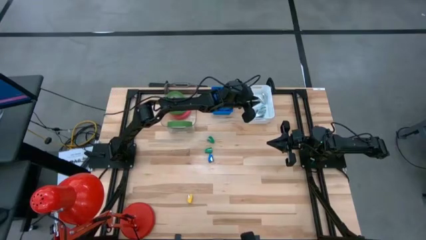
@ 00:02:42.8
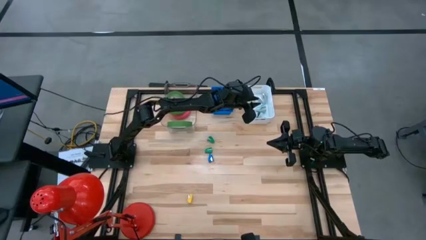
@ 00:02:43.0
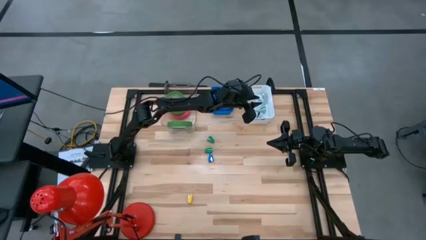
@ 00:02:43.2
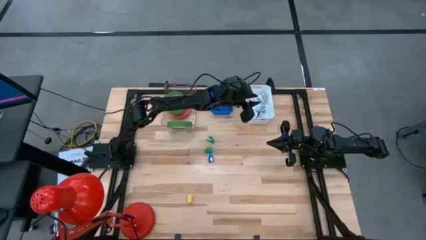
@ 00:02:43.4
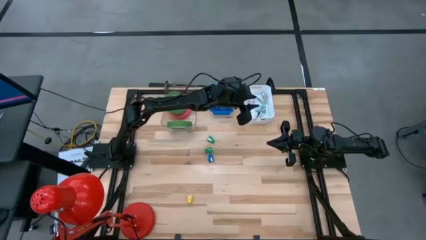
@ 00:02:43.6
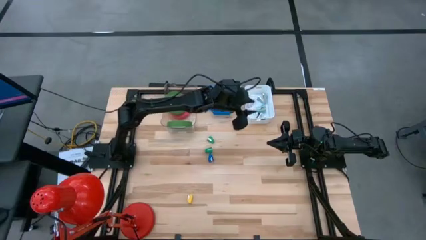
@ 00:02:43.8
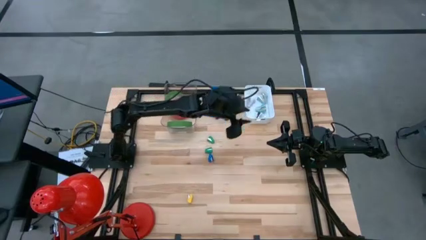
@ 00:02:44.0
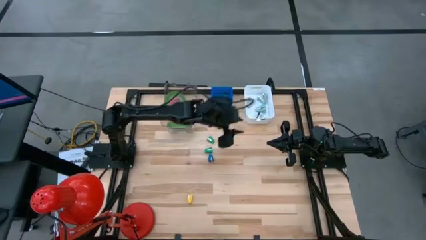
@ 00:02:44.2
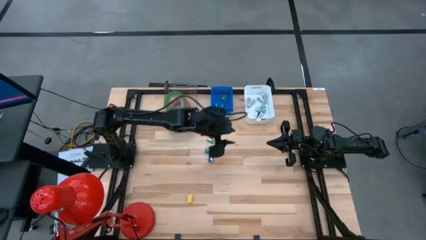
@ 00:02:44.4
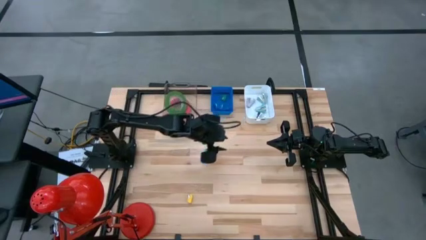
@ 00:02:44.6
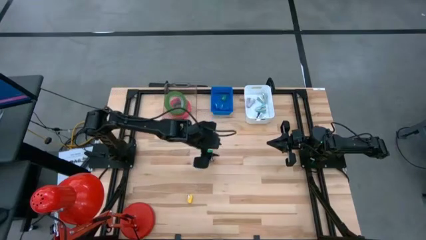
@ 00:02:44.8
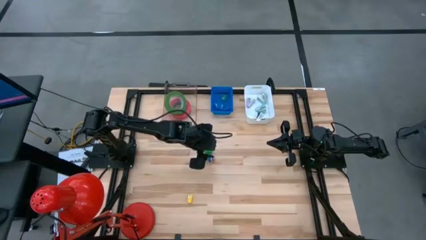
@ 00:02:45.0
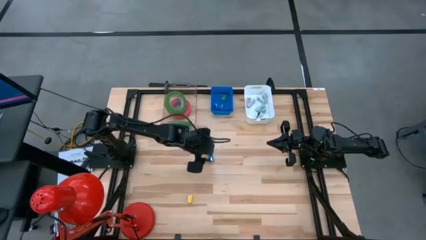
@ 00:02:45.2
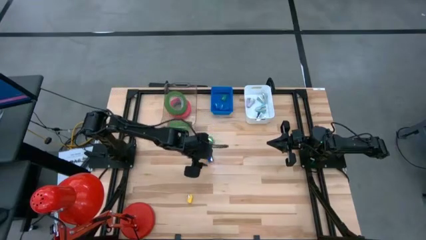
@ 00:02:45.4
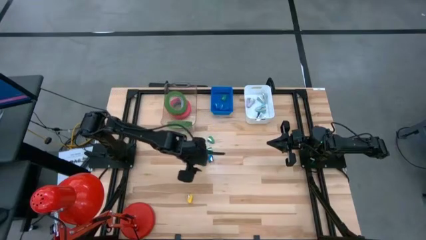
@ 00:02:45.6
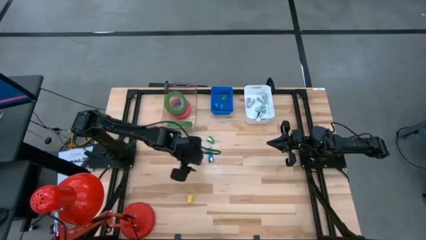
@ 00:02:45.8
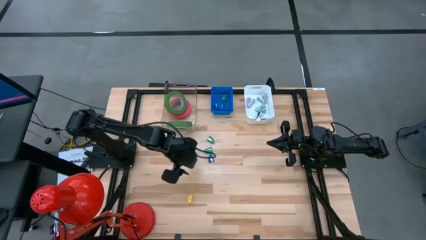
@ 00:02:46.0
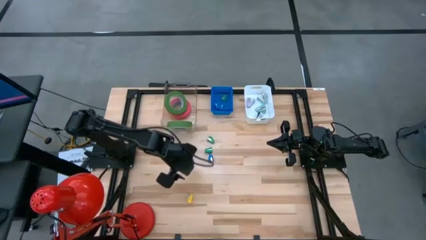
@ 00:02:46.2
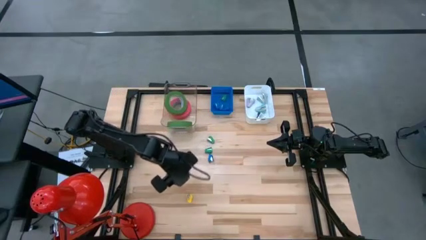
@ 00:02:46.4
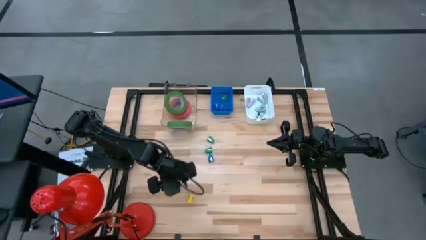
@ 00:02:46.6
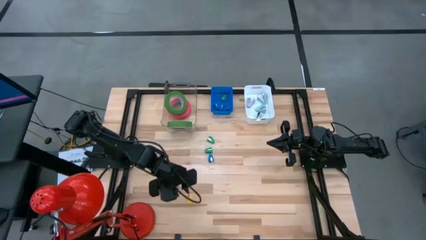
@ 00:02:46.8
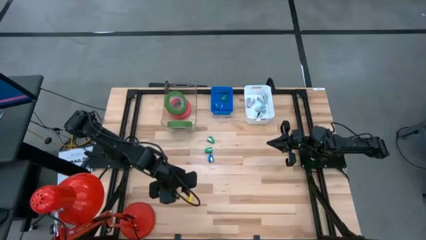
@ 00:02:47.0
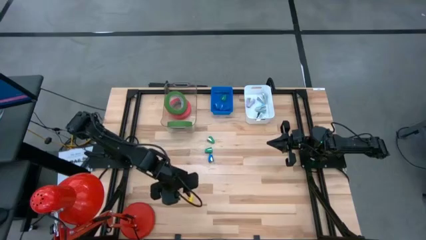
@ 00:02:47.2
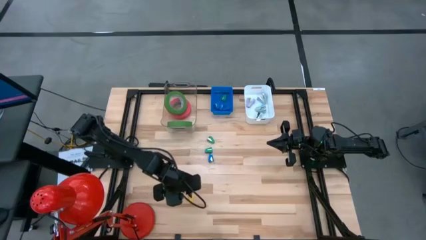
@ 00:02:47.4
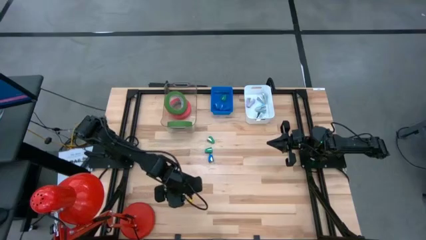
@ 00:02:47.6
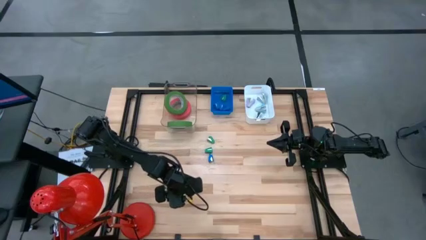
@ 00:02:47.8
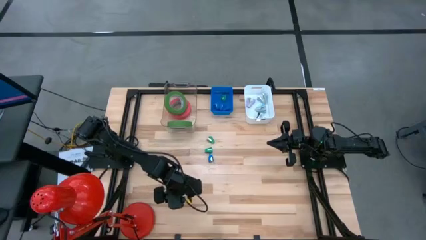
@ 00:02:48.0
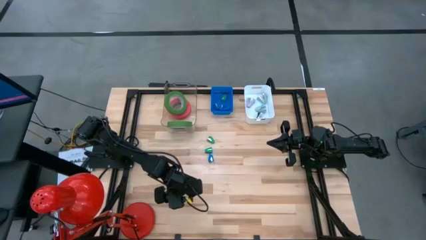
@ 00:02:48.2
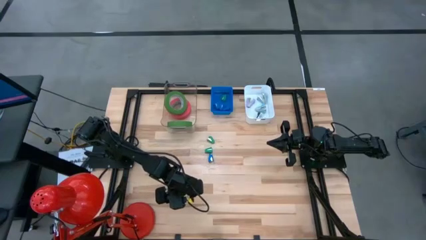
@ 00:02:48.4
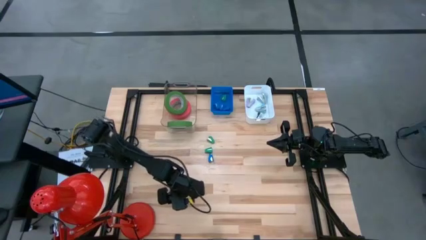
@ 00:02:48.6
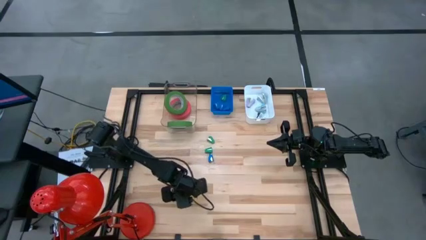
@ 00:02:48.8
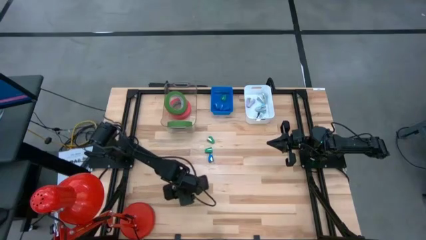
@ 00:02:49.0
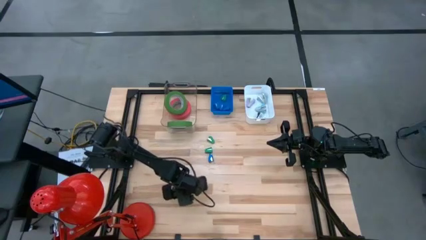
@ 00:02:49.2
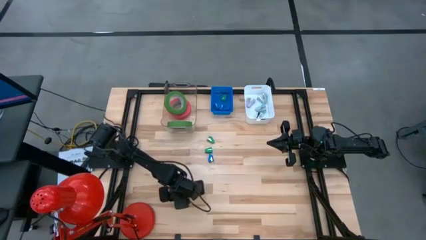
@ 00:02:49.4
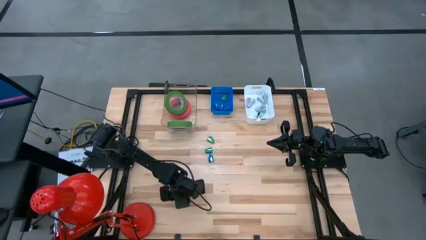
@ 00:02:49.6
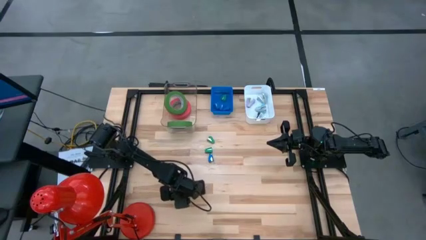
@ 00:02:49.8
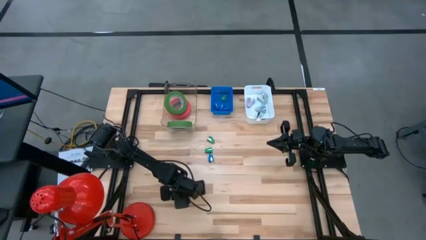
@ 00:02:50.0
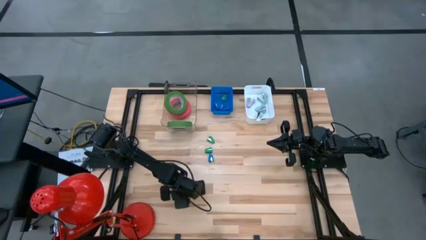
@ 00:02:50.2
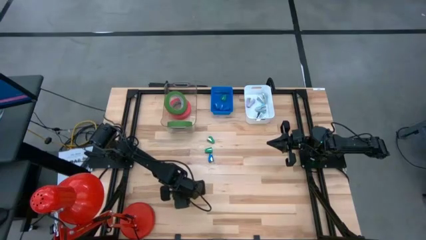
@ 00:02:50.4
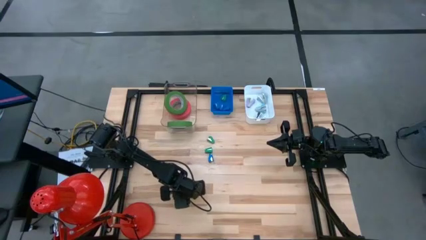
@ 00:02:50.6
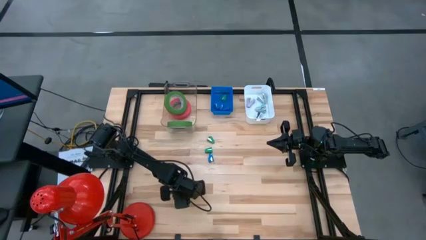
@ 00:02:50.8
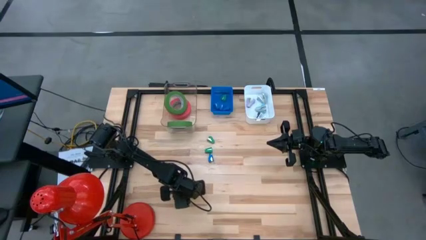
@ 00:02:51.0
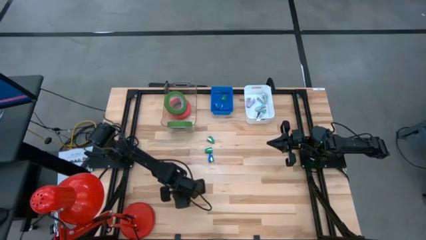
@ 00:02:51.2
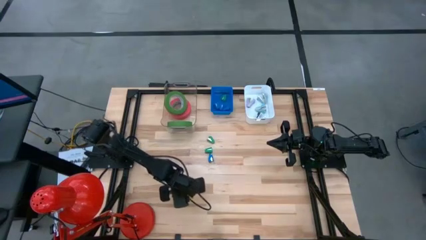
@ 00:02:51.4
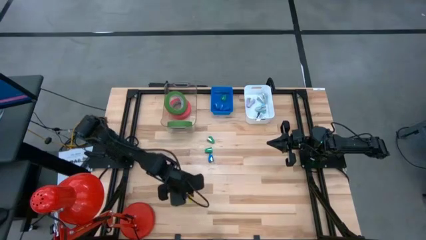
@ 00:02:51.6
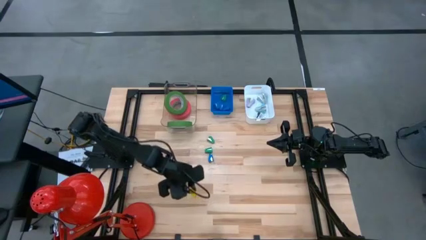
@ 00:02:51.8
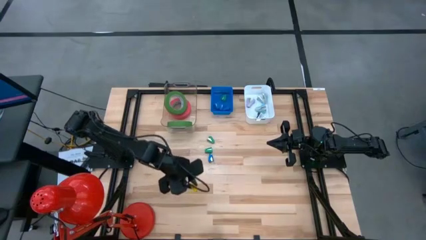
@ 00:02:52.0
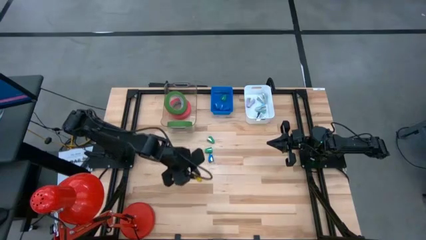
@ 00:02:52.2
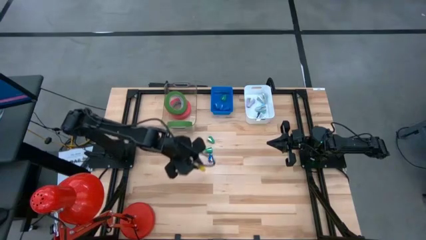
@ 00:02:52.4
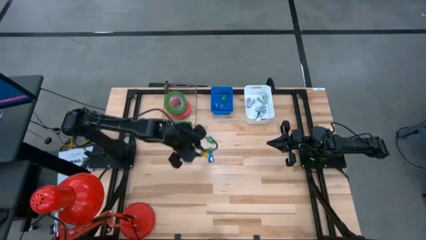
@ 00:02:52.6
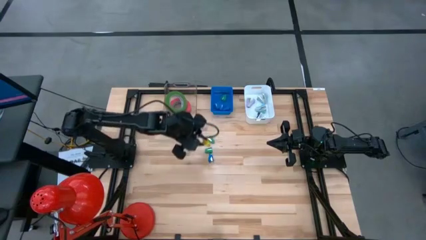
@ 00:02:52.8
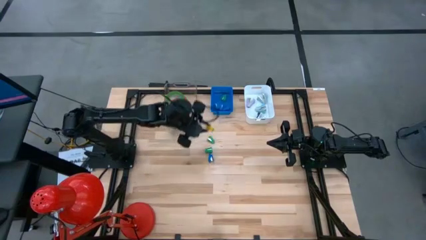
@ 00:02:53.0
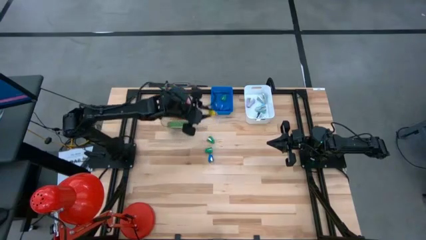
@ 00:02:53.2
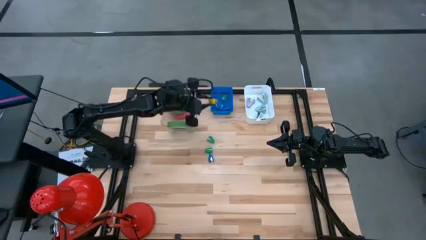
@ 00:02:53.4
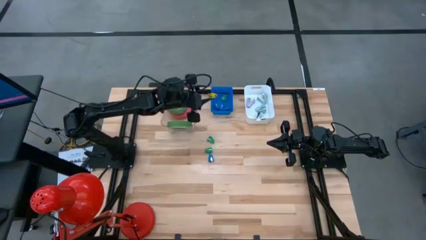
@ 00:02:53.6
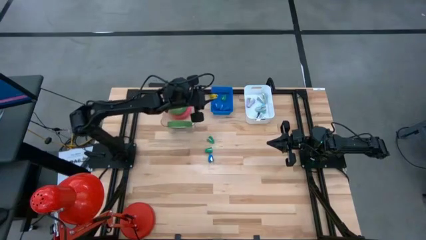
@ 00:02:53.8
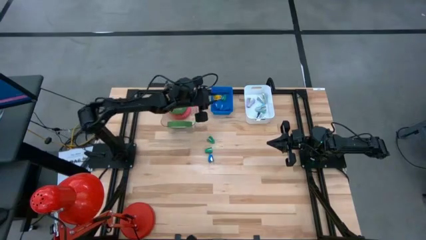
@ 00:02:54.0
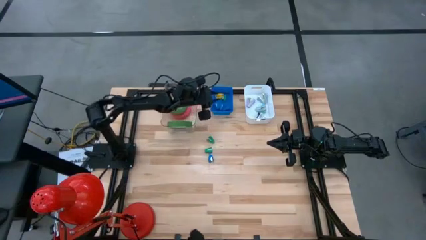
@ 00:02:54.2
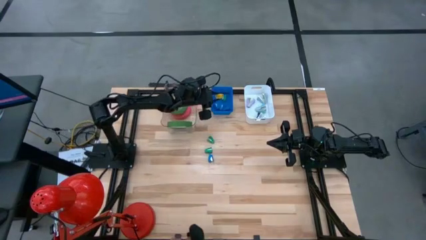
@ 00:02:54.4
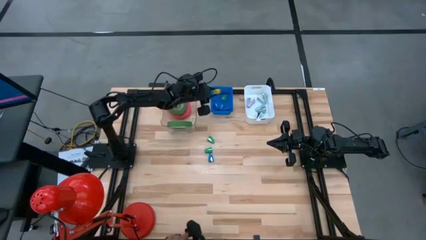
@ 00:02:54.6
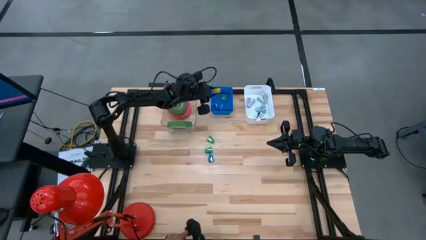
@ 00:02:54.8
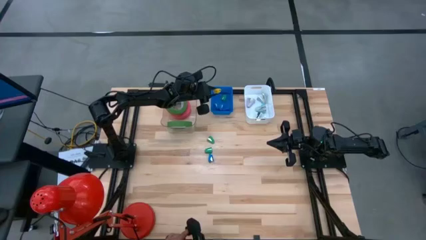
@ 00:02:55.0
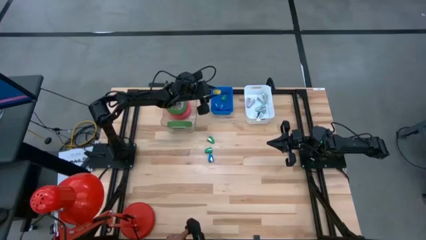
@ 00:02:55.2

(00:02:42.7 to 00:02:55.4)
Task: Pick and place Stapler, Stapler remover, tape
Put the yellow stapler into the blue bin
